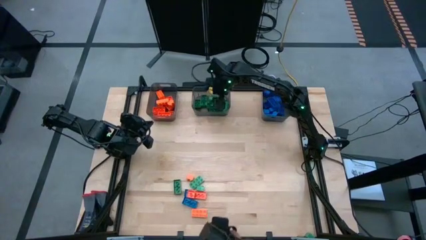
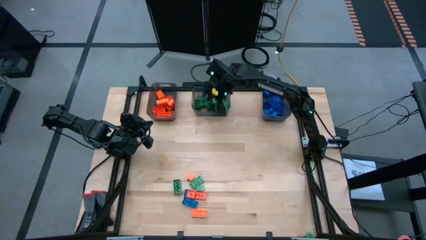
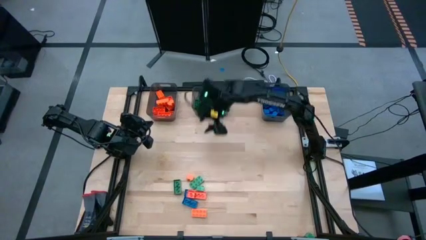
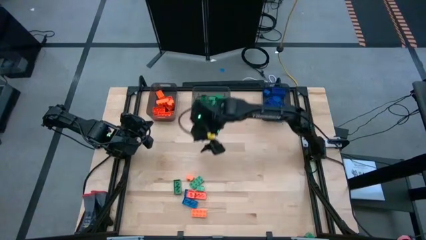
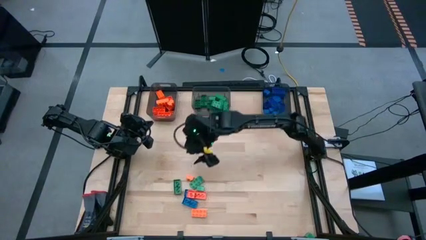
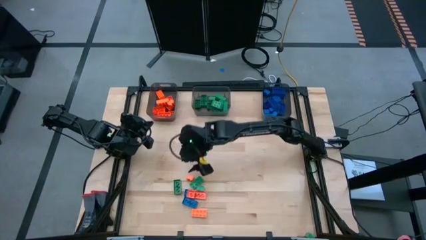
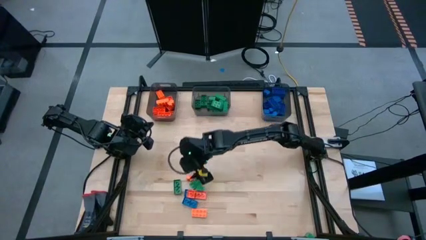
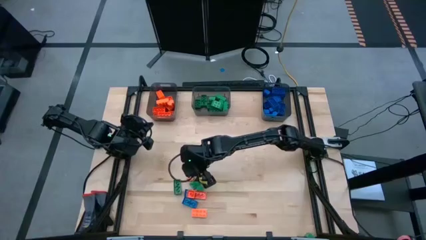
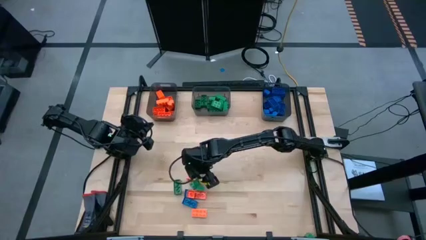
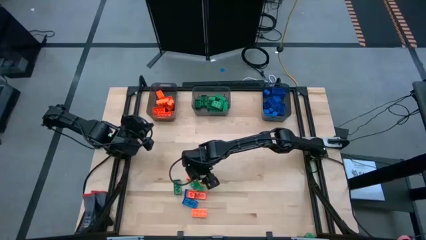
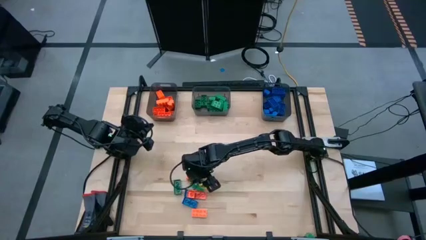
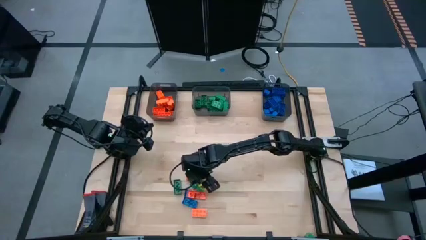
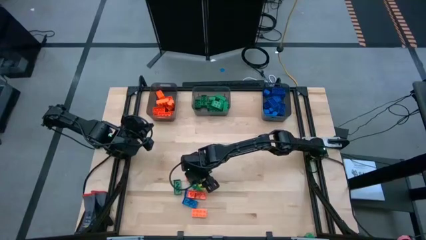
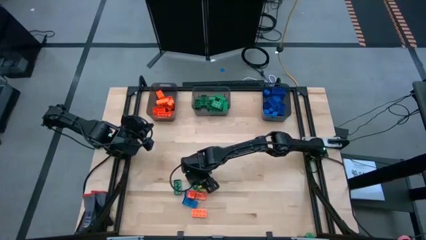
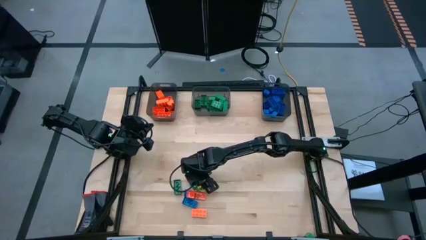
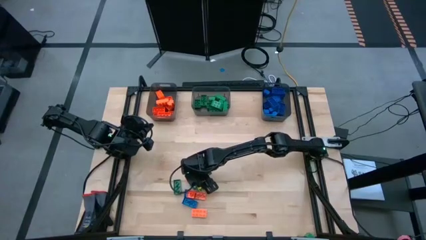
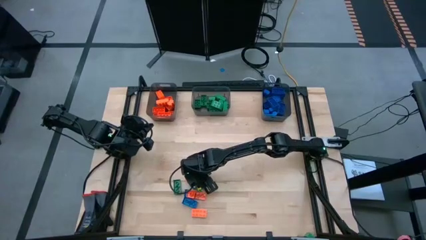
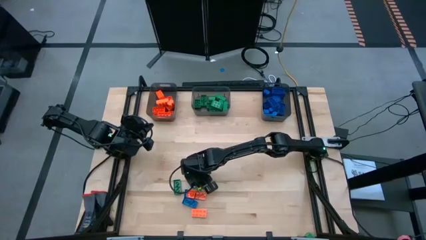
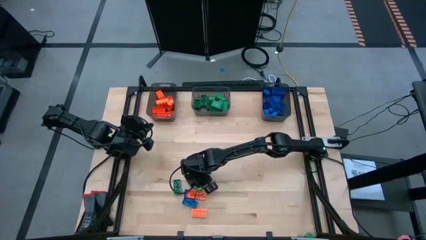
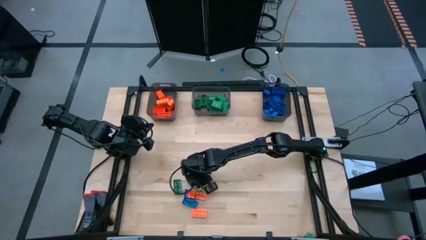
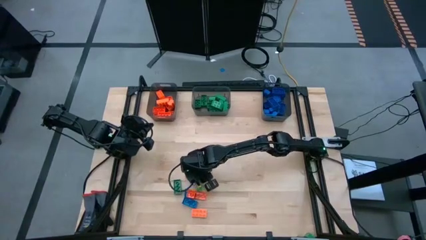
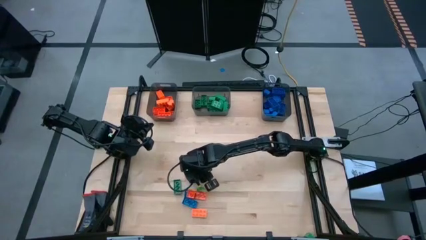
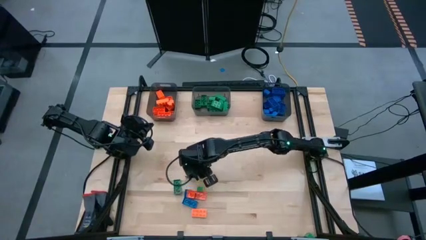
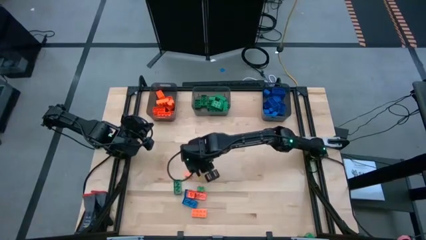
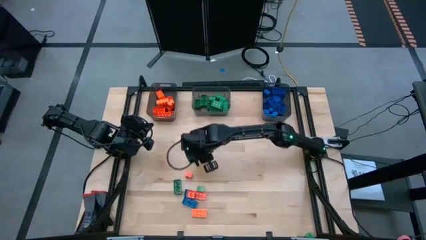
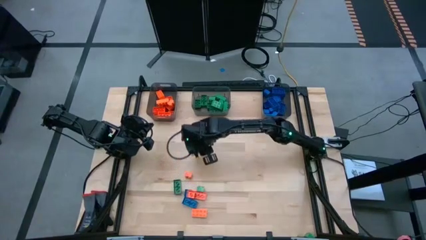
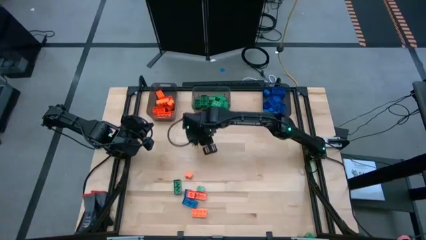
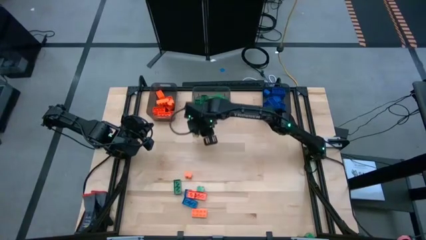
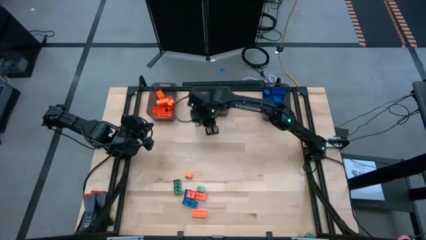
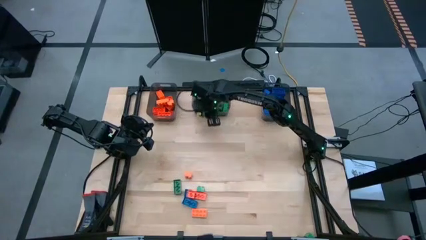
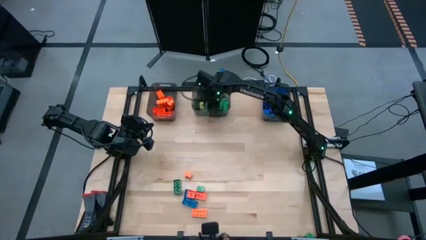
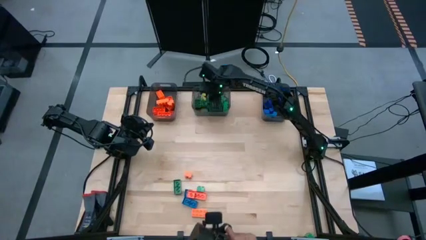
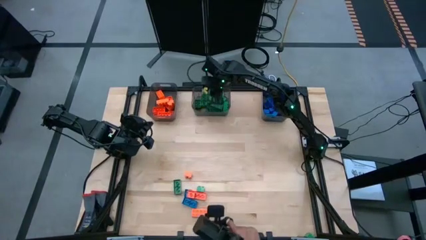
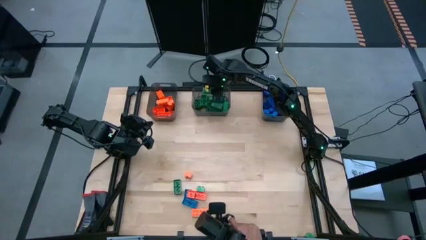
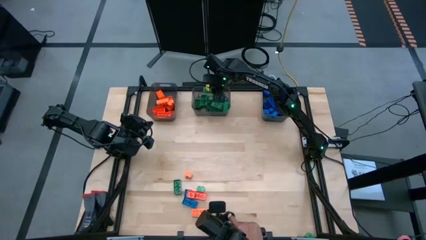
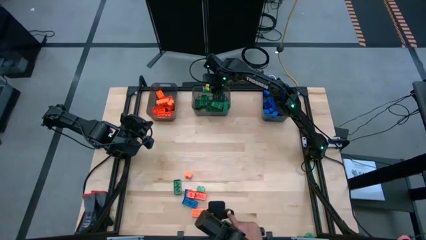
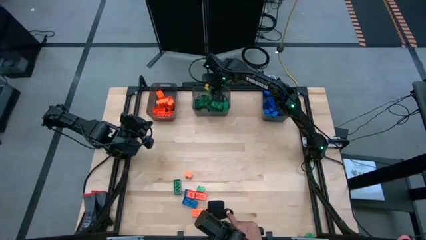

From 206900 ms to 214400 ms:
Task: Sort blocks
Put the green piece into the middle black bin

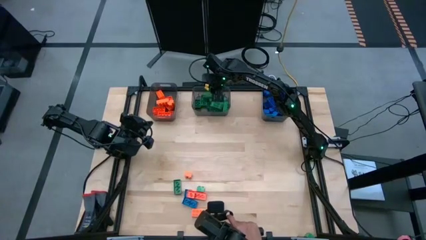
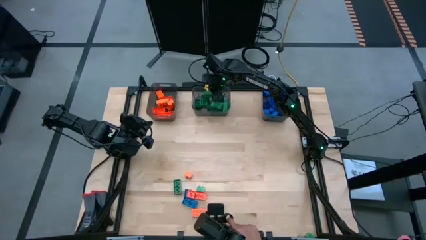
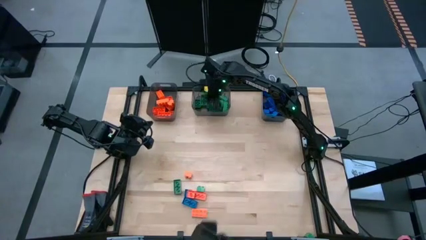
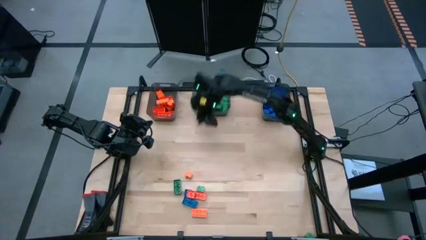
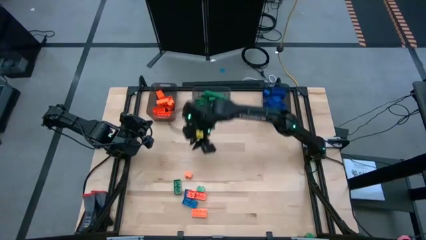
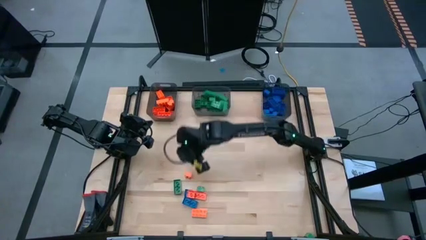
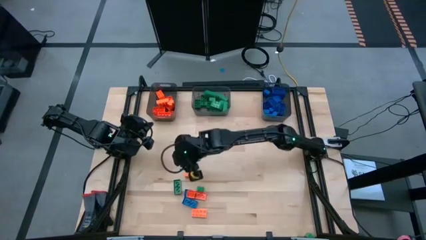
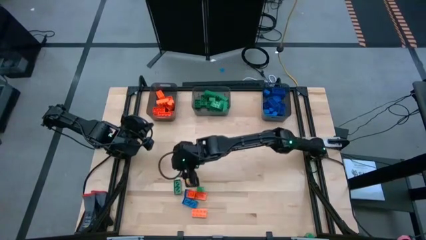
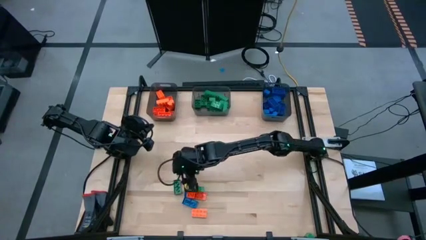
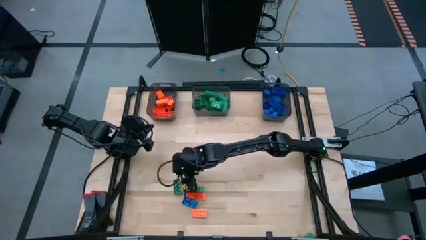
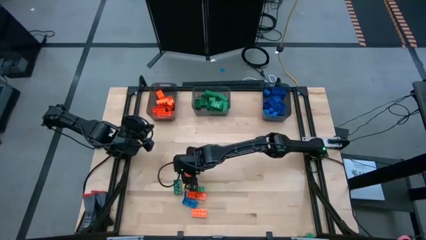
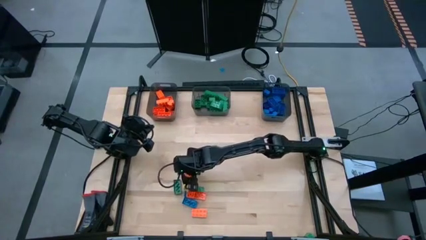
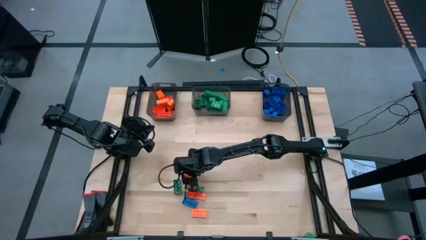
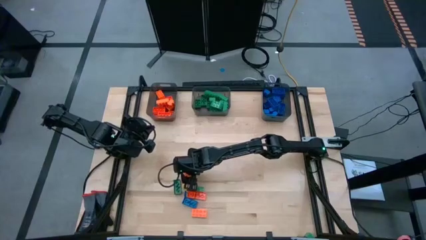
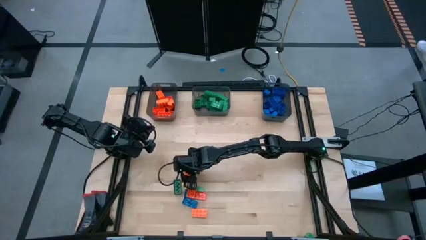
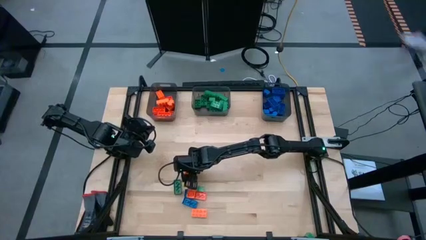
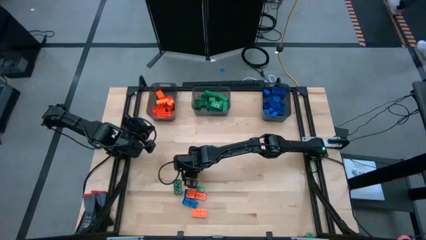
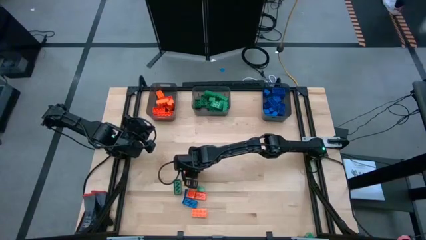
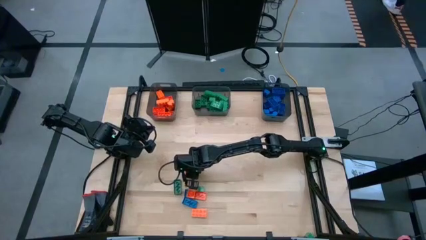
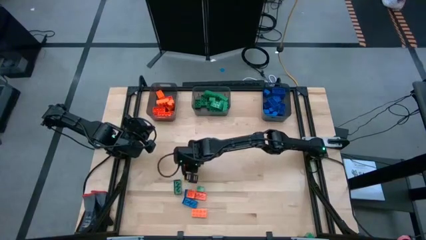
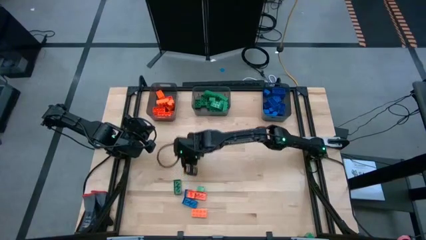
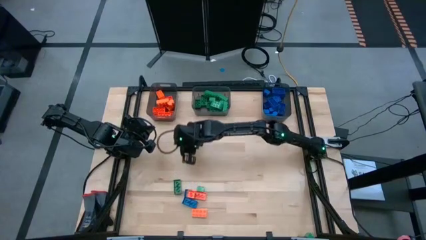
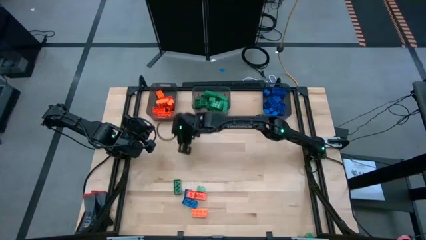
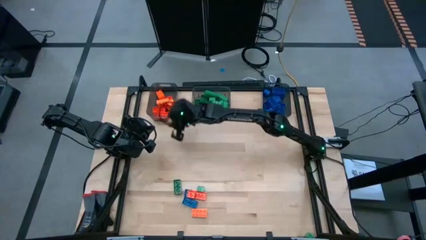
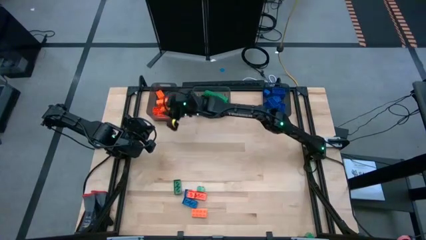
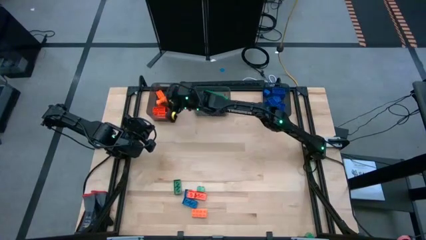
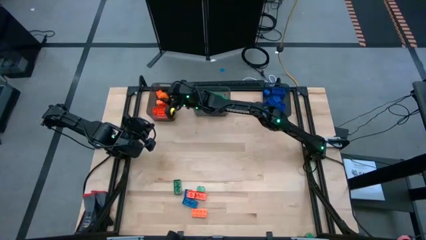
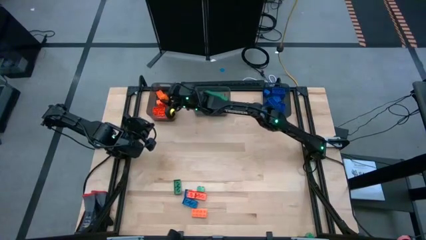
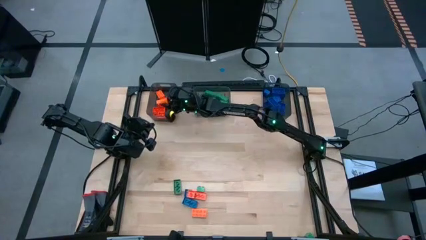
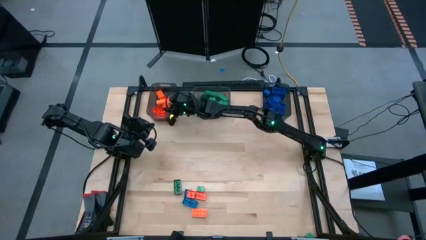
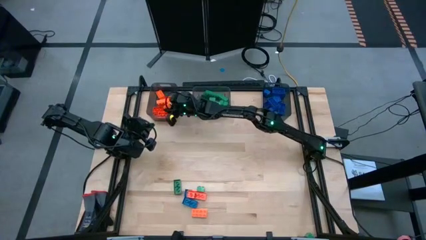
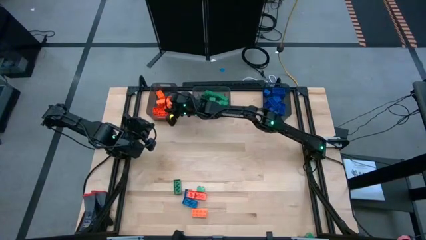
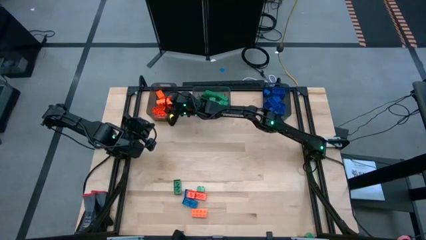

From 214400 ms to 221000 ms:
Put the orange game piece into the left black bin

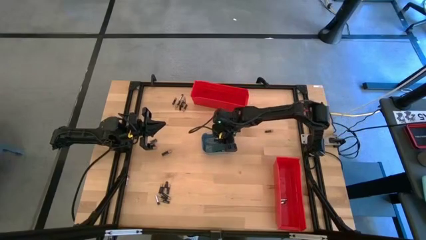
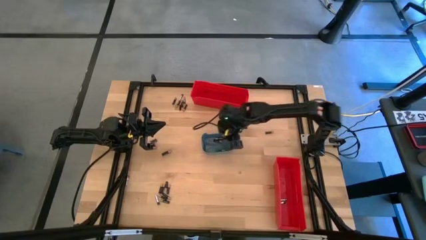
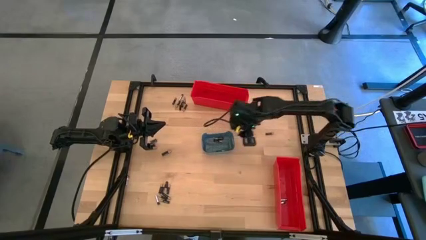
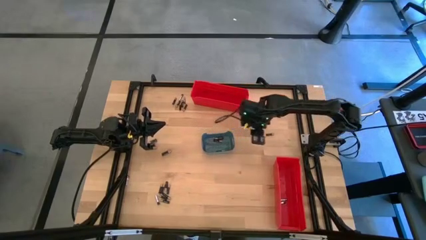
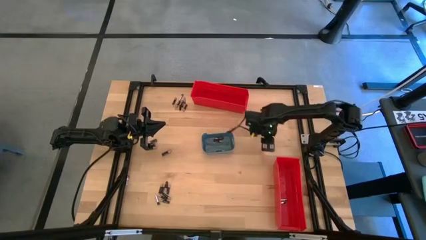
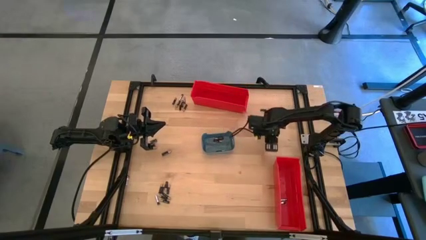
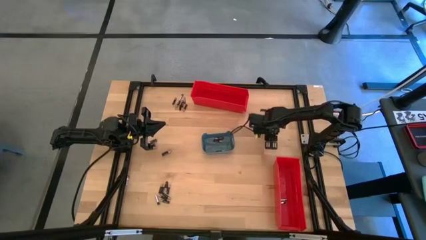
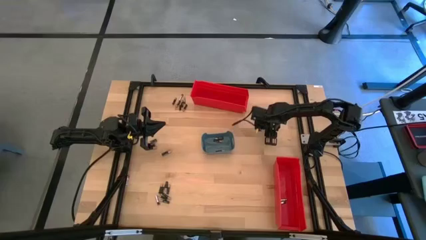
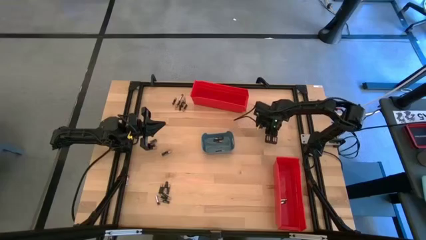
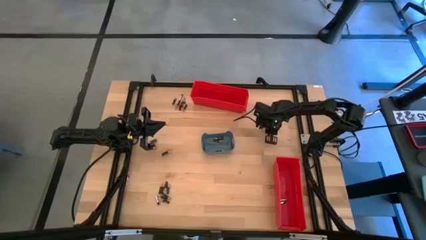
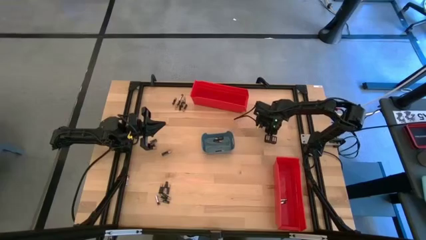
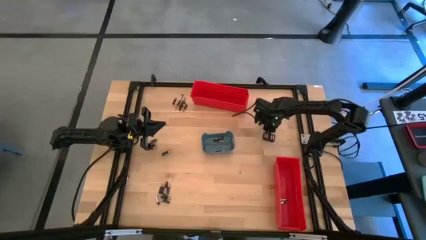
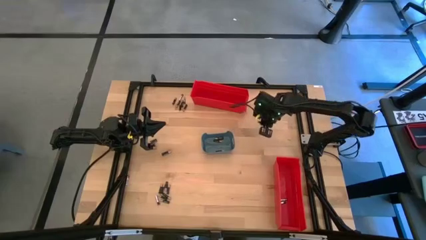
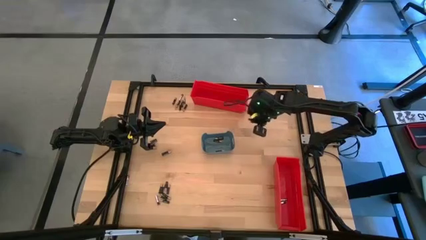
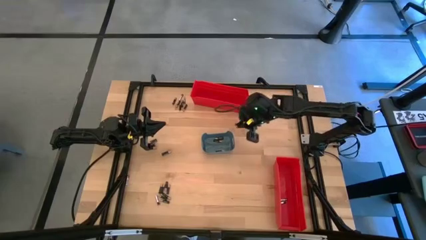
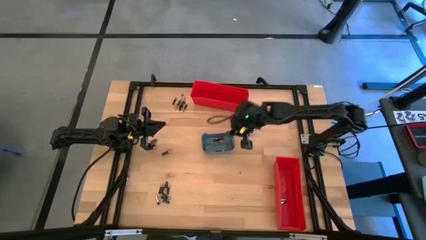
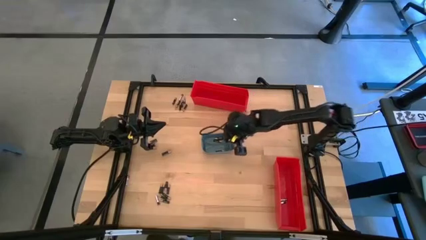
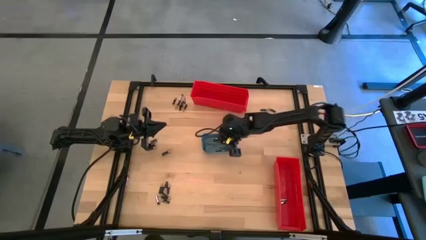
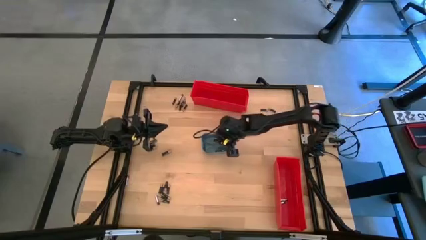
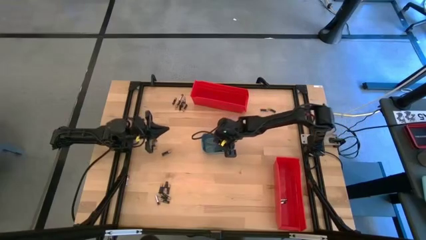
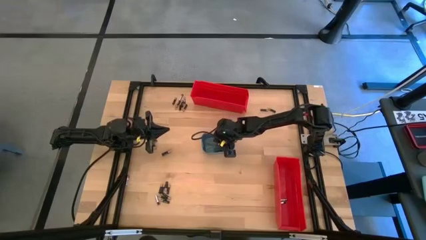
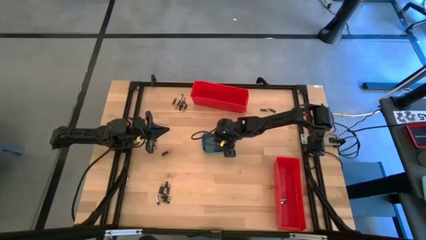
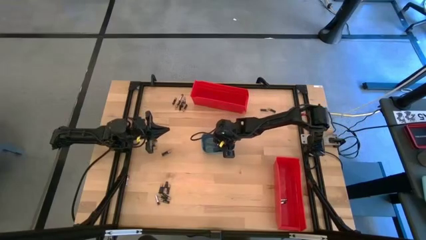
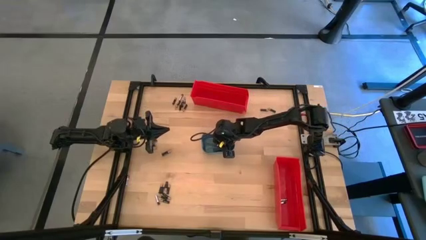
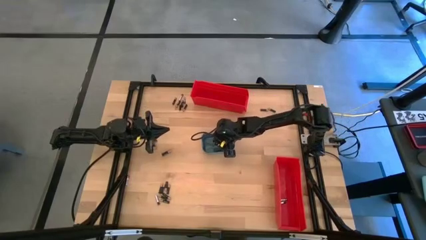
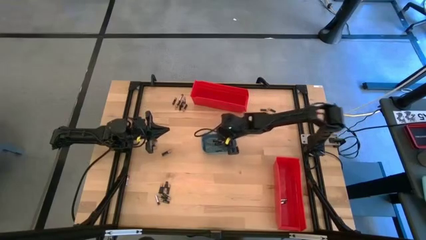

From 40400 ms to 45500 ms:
Task: Sort batteries
Put the black battery into the blue bin
